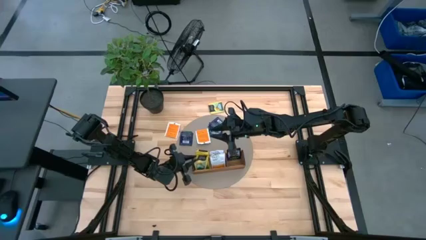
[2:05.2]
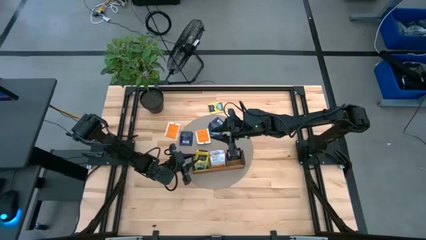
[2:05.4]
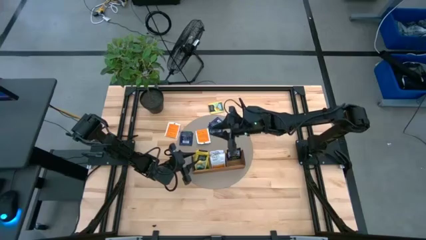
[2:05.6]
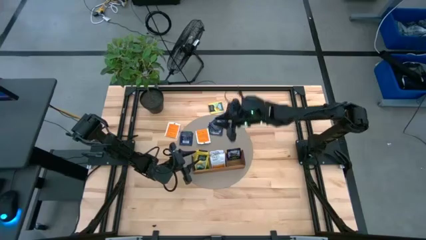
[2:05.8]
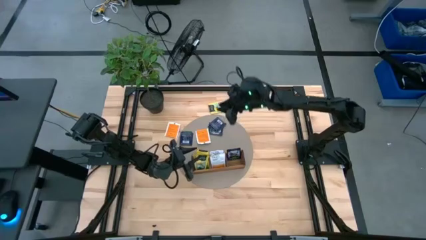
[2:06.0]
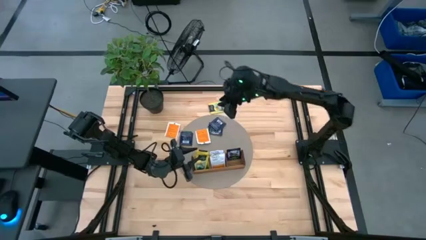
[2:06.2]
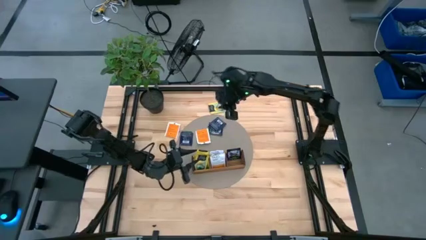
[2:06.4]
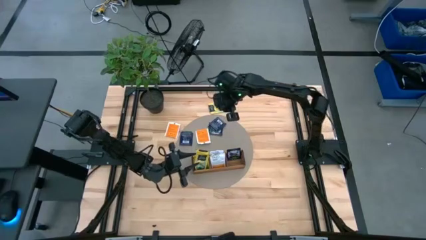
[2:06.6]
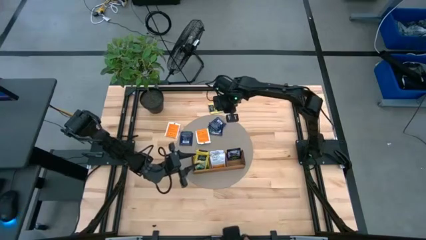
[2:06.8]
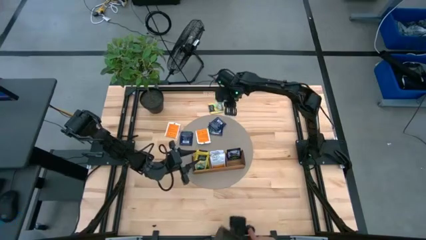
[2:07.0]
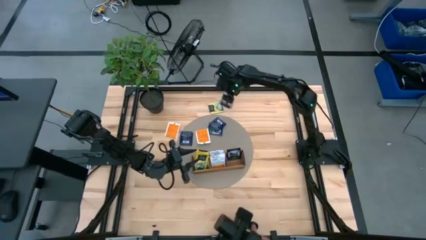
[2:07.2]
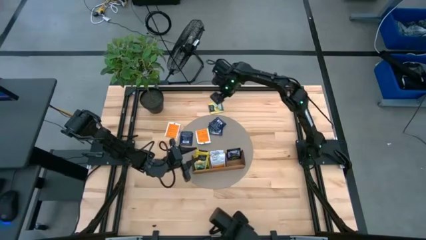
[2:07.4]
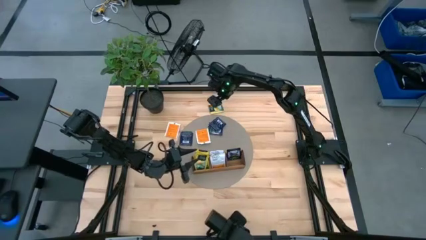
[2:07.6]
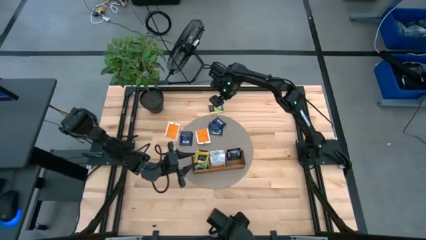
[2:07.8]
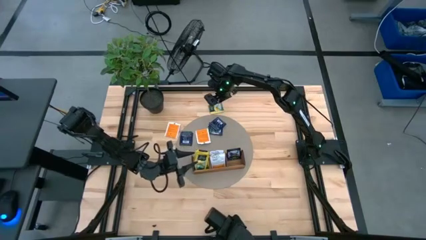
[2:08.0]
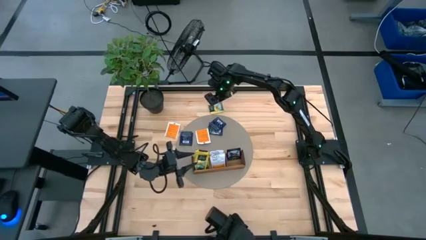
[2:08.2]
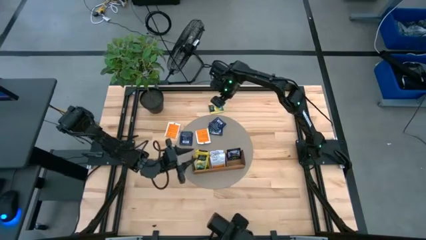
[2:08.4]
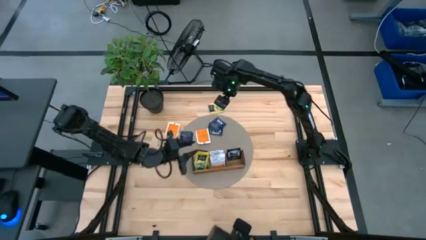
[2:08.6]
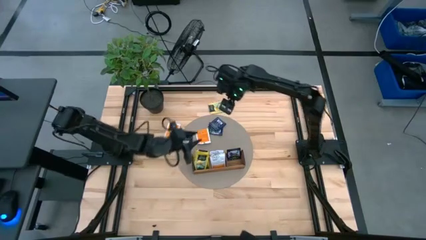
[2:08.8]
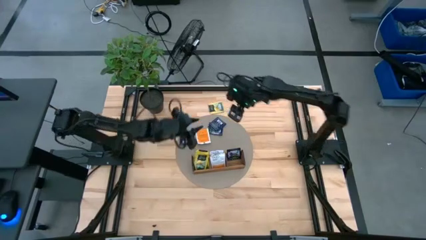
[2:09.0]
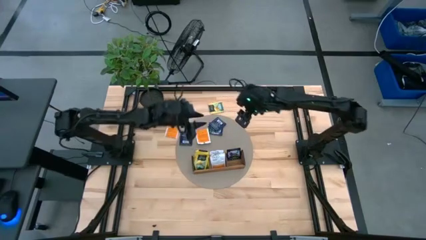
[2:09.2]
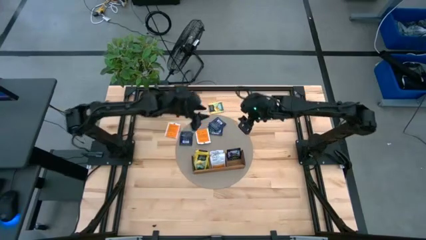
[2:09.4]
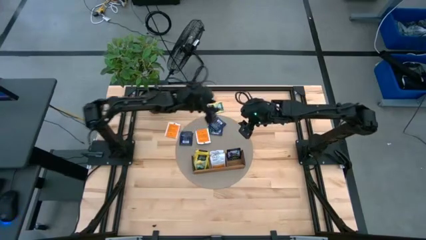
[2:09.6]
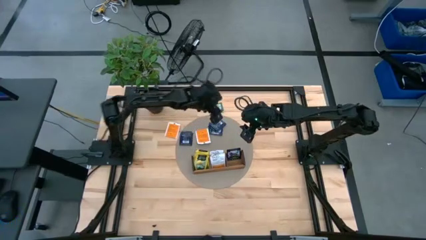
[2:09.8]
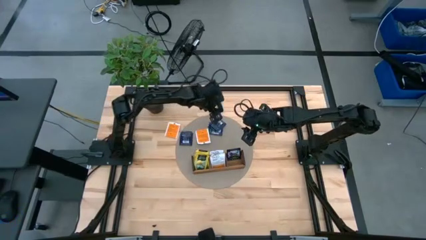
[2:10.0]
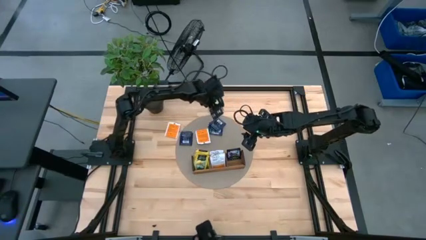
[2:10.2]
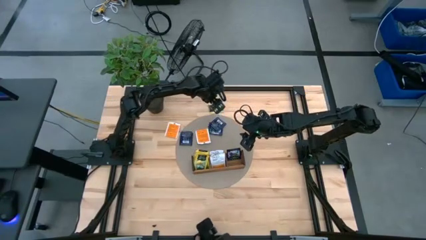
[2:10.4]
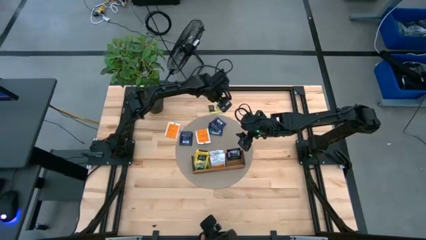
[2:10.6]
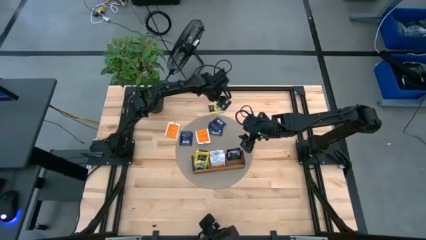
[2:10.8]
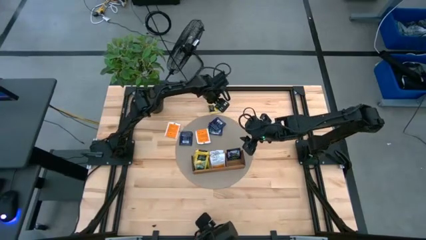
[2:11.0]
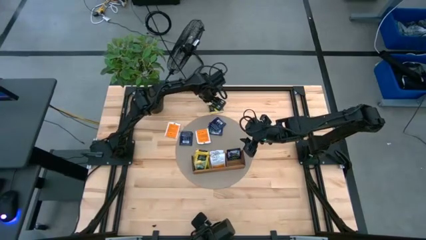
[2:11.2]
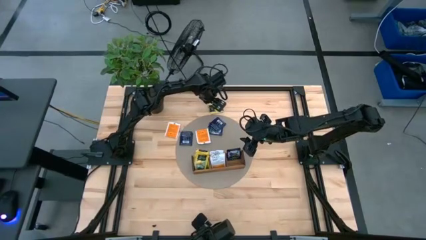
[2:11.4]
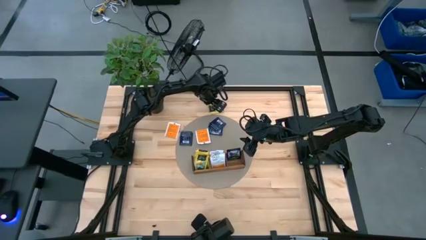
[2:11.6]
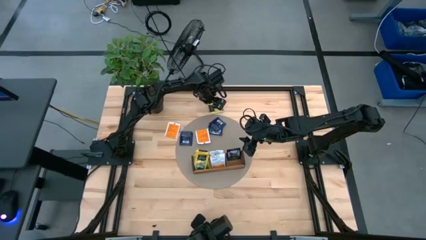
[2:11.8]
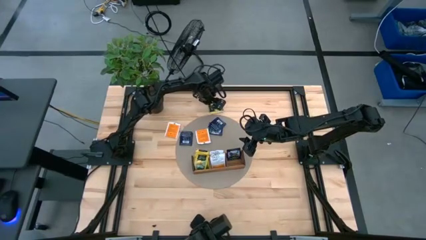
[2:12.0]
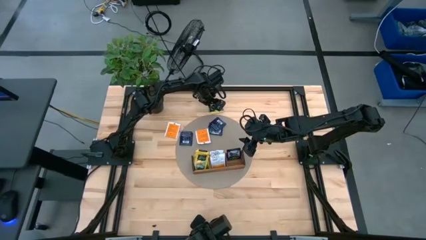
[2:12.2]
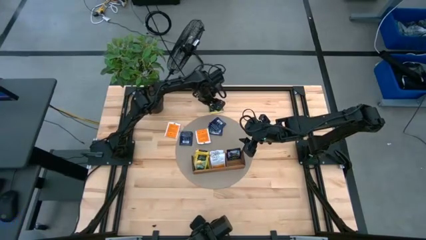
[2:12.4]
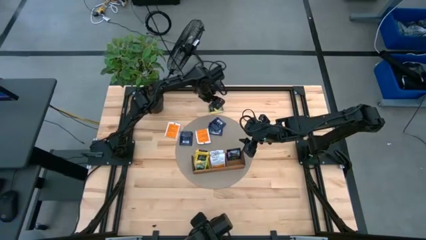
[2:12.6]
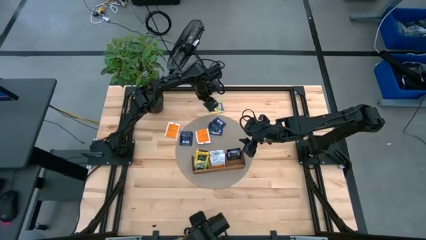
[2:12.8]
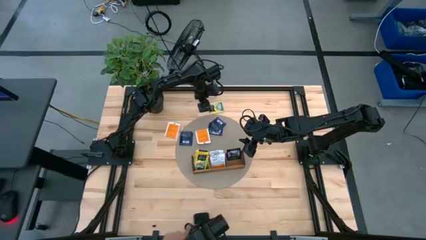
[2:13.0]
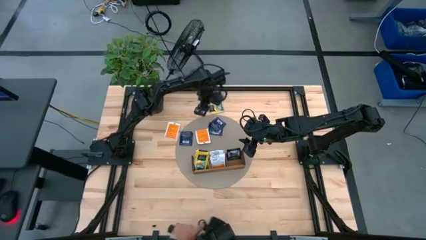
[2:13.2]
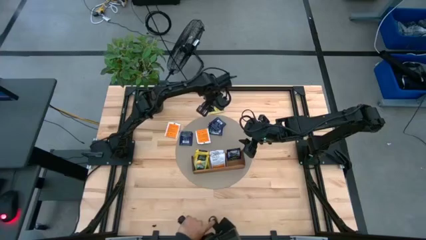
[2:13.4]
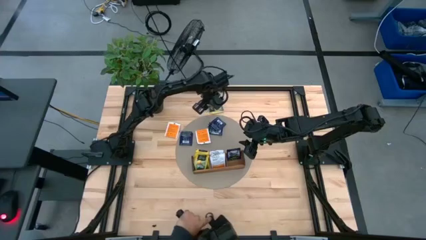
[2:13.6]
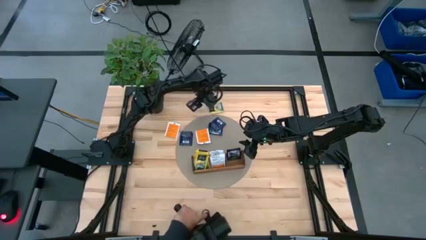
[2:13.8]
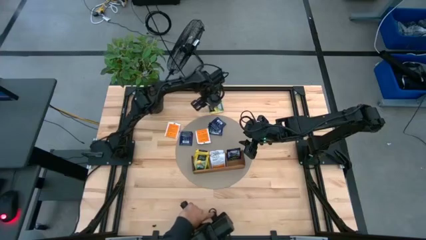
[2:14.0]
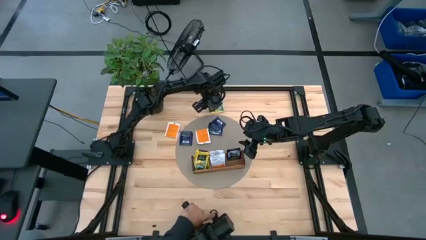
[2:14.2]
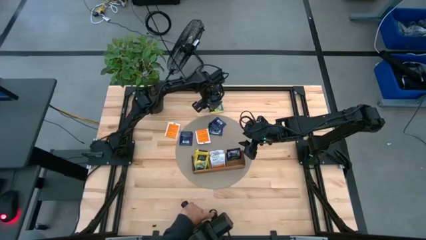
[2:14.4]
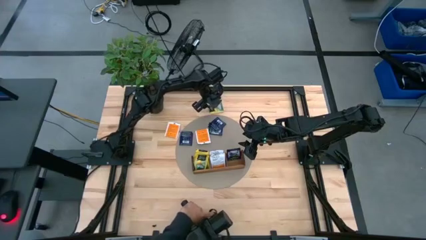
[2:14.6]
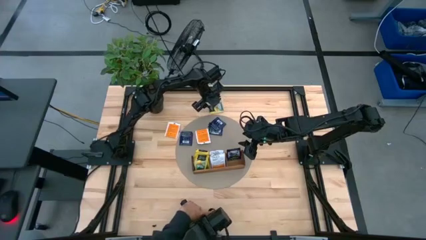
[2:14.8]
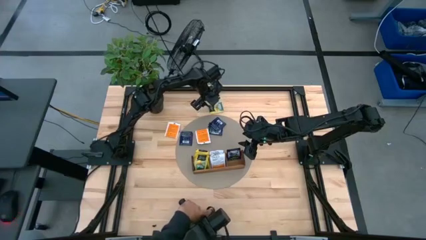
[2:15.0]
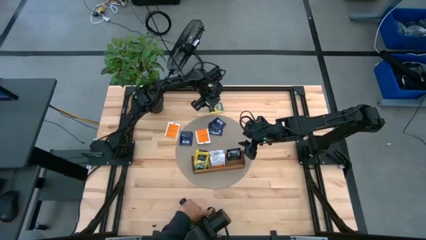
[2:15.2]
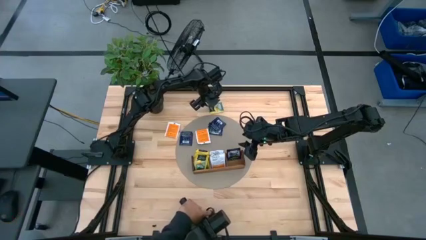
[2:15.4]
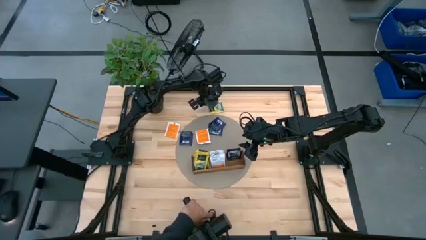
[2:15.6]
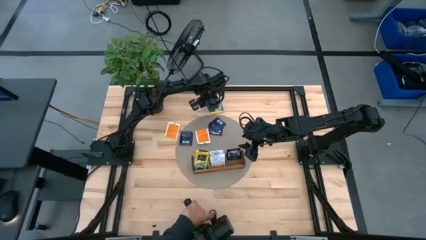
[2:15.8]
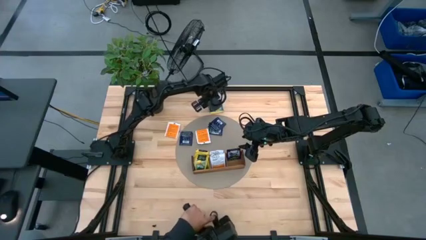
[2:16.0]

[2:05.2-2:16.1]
Task: Pick & Place Tea
Put the yellow tea bag into the left section of the wooden organizer

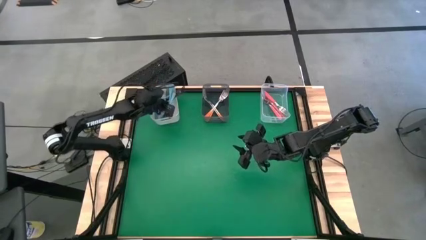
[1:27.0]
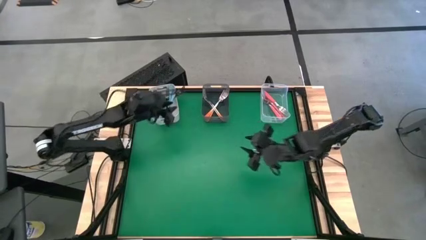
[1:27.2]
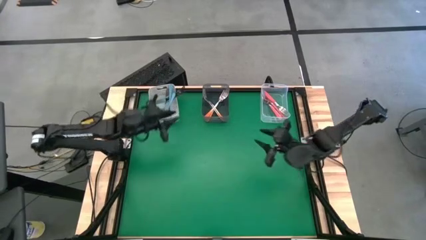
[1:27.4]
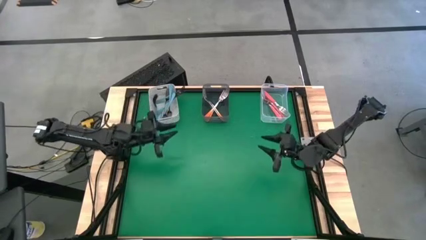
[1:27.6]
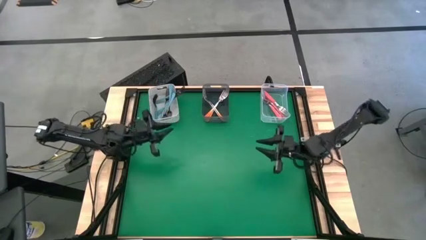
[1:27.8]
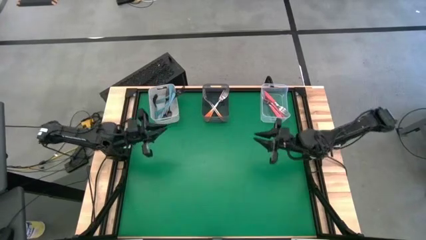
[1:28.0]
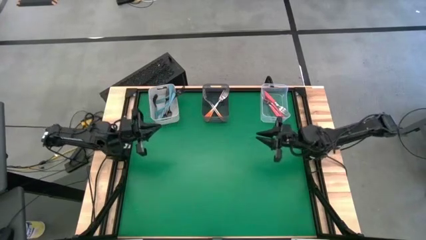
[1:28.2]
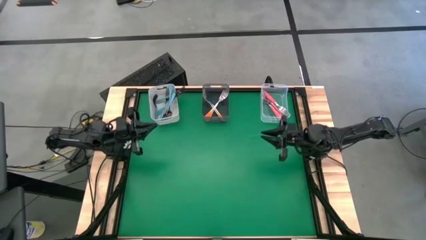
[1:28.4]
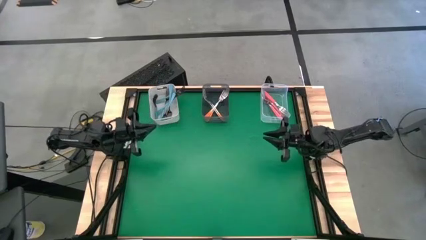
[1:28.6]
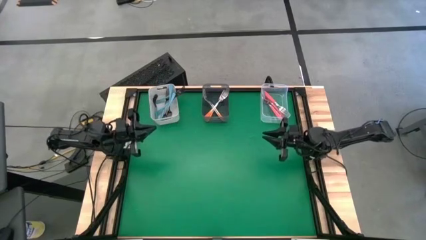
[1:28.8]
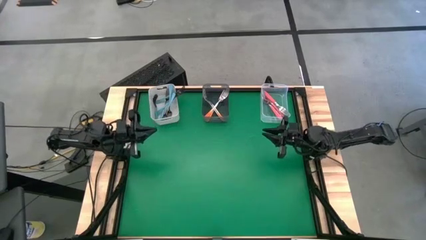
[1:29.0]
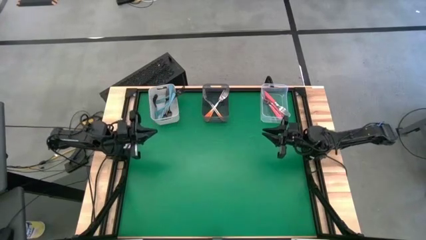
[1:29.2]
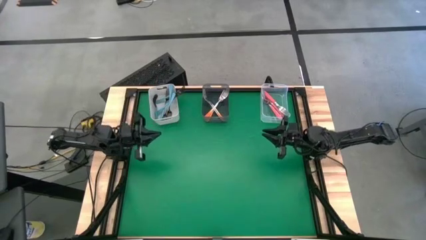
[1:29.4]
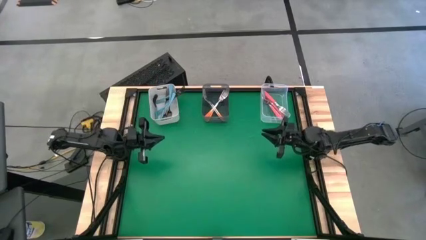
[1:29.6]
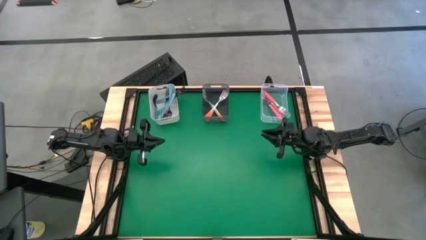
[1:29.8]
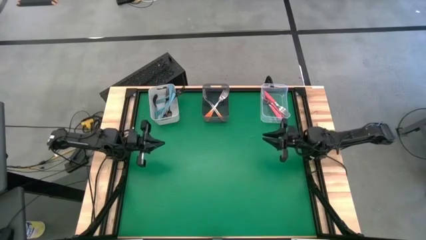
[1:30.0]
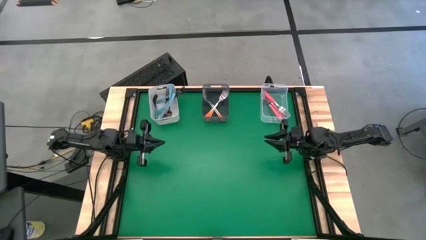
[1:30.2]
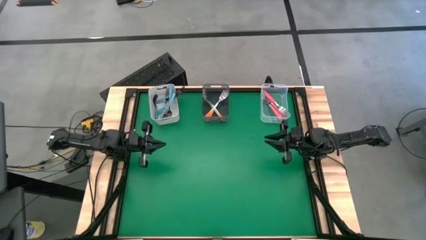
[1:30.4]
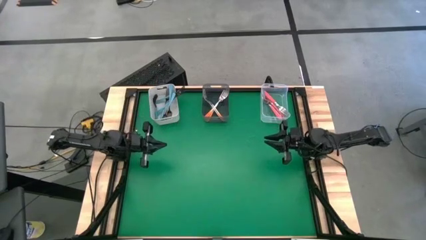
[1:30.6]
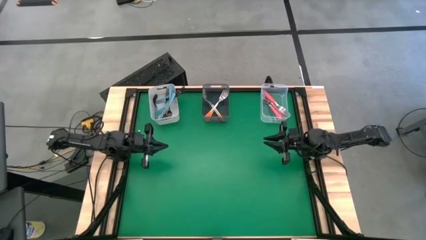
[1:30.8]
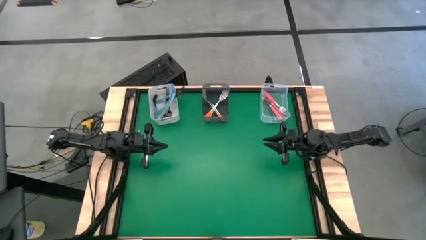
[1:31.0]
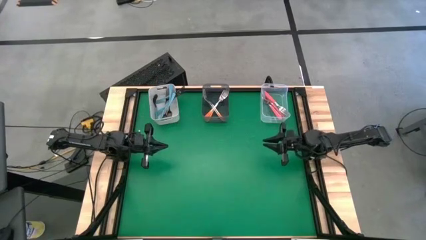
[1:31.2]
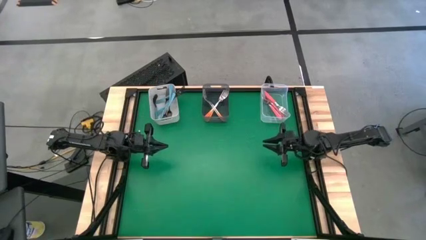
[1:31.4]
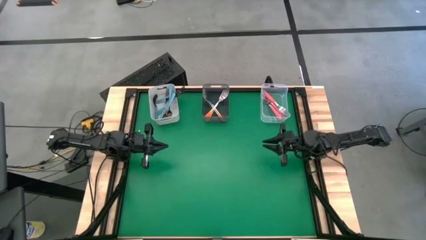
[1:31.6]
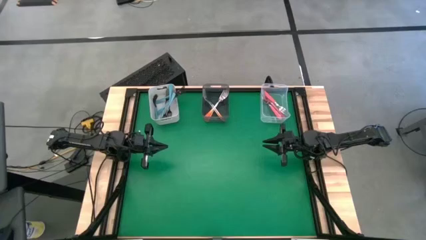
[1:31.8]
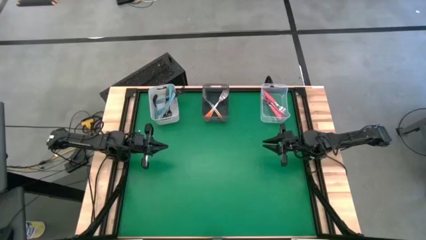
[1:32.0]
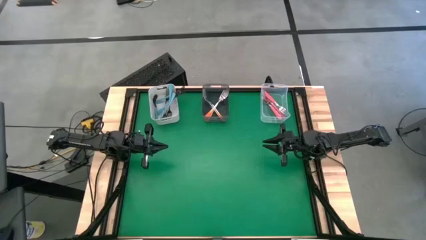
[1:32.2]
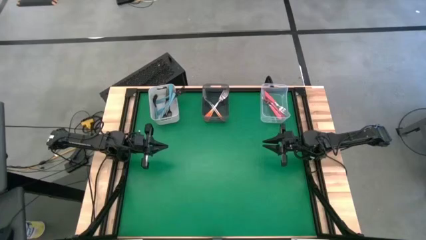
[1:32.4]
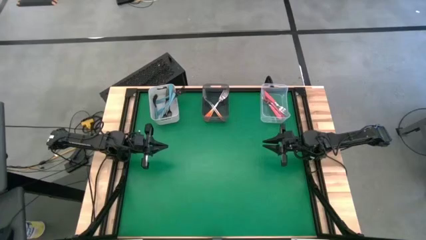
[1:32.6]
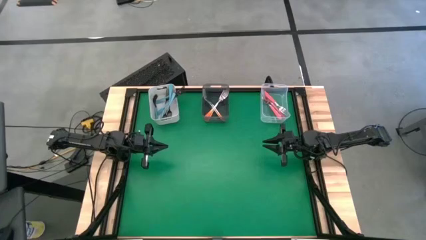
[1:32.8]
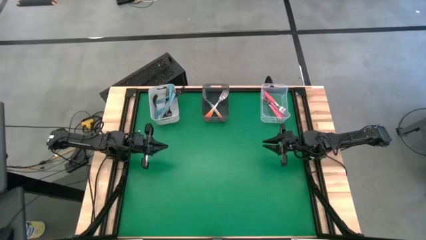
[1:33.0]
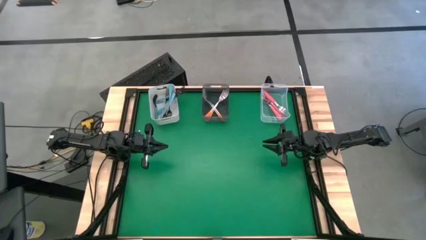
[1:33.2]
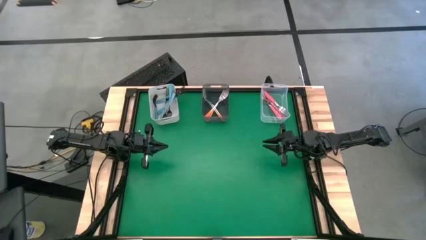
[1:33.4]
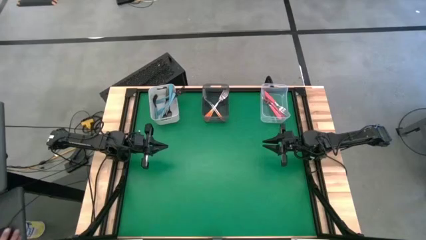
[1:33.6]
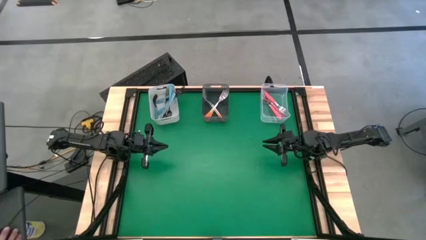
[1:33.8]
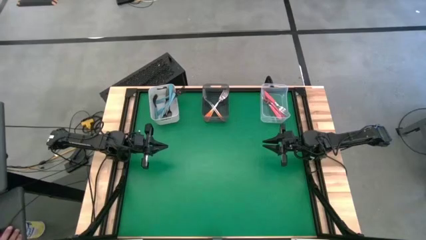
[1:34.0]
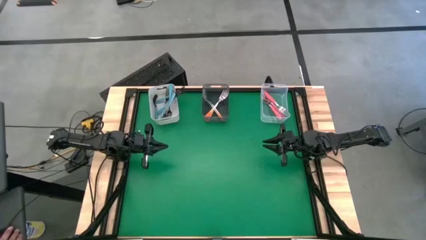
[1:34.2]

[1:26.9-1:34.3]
Task: Sort silverware by color (type)
Return to Home Position
